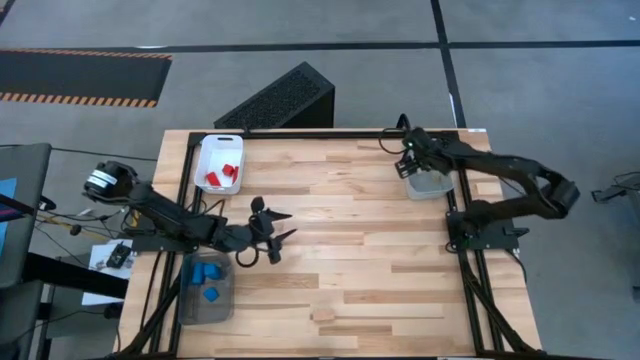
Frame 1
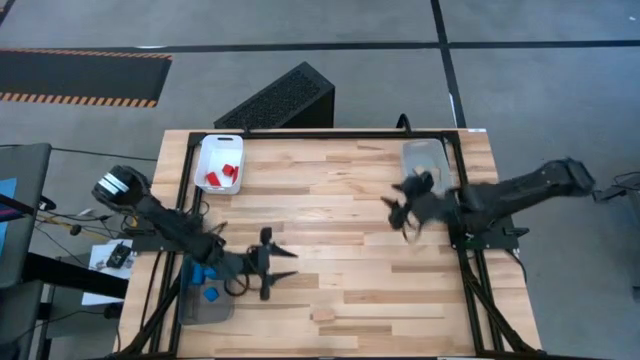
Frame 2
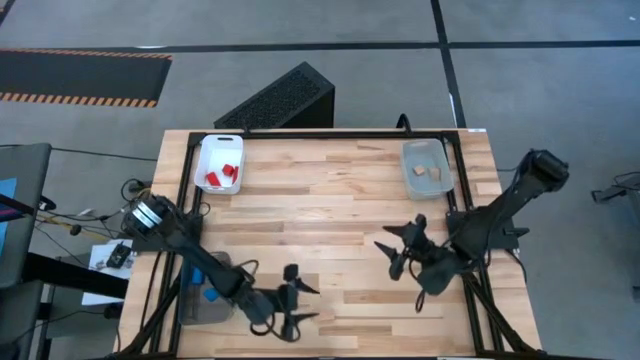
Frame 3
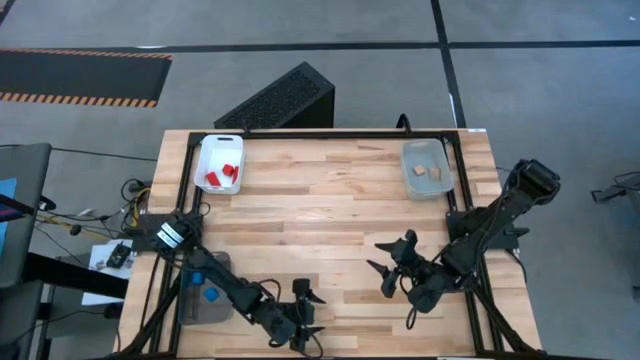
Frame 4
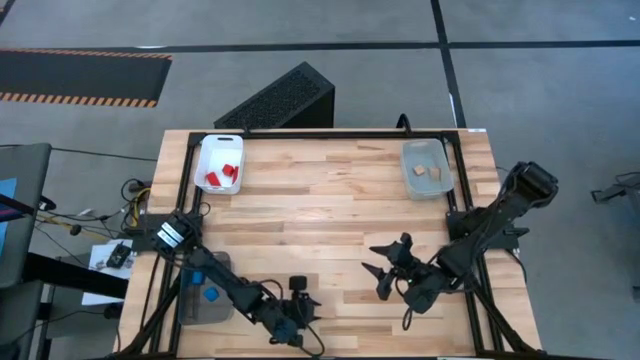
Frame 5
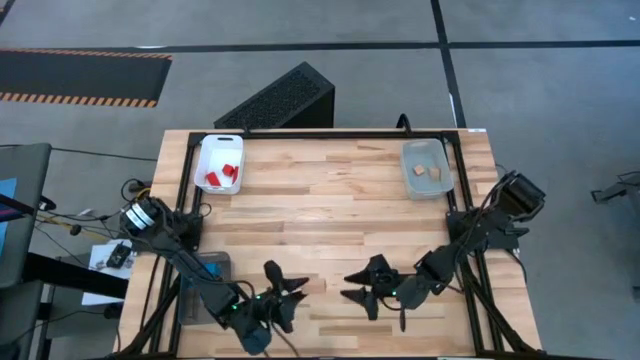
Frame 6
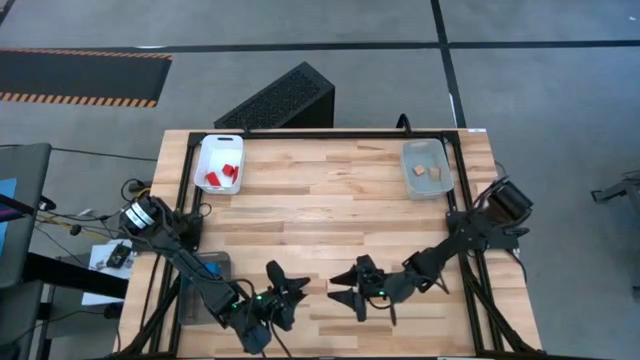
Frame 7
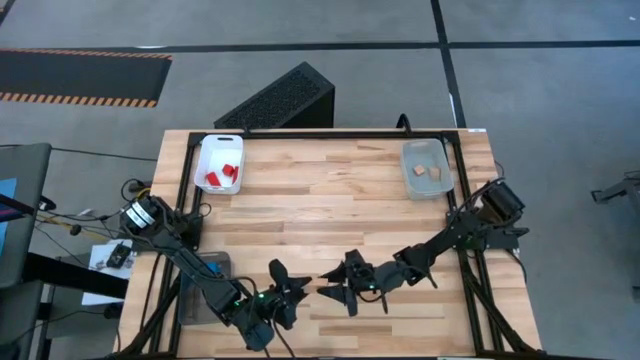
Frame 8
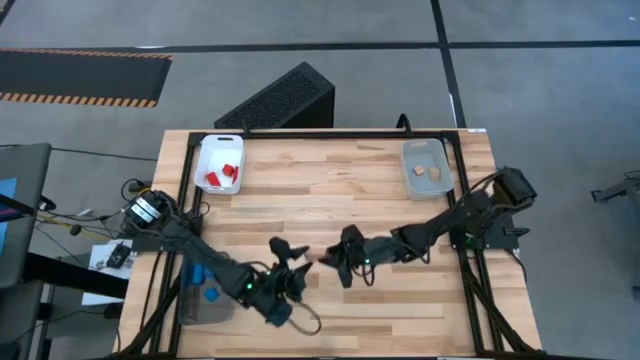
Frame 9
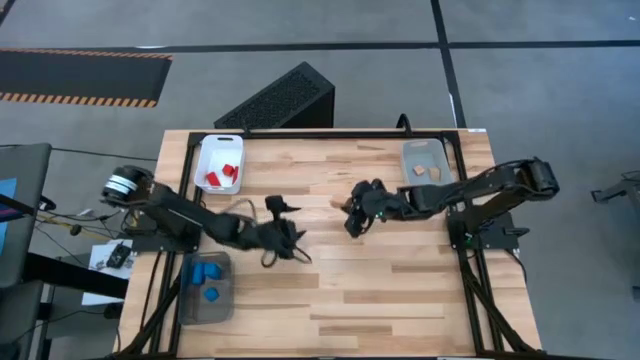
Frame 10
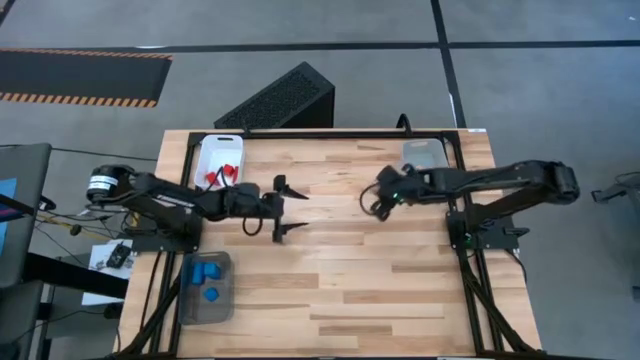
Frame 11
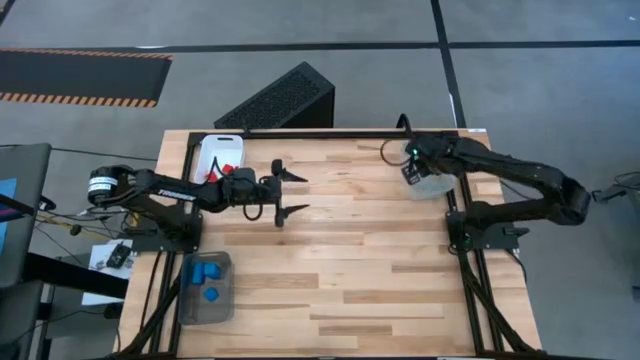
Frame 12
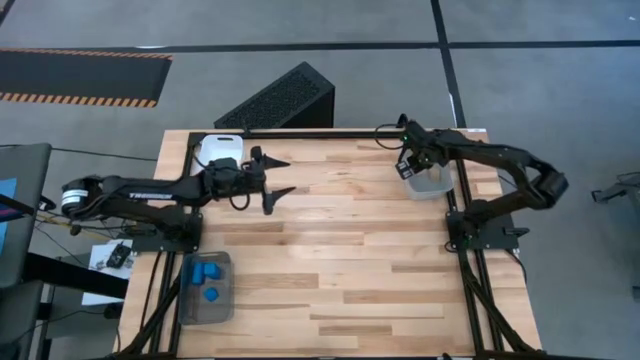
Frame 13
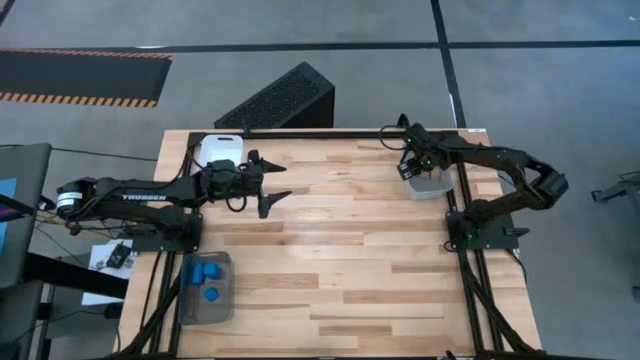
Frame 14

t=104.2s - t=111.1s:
Task: Sort & place blocks by color
Put the brown block into the grey bin

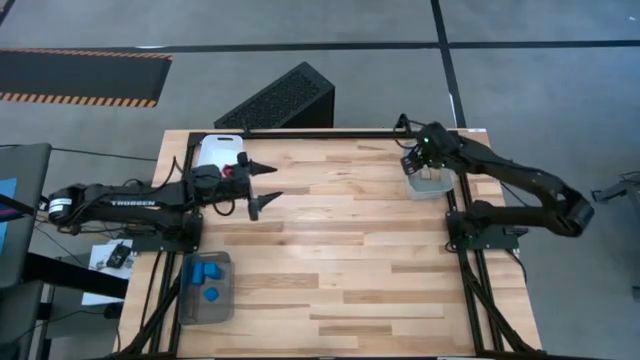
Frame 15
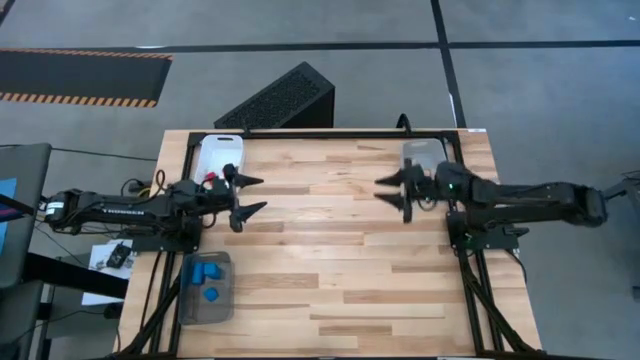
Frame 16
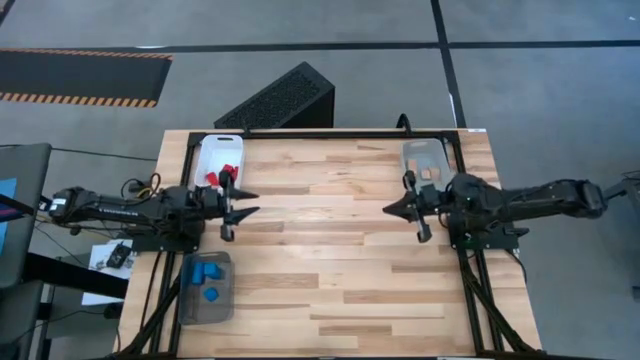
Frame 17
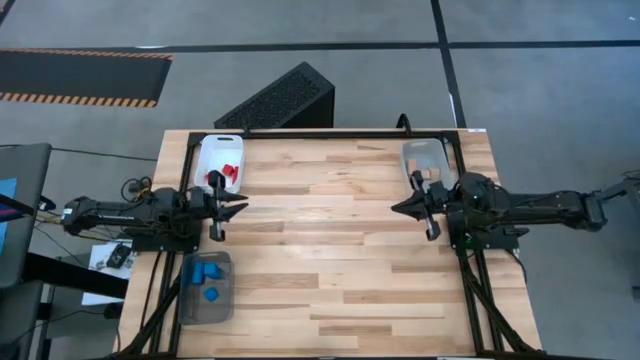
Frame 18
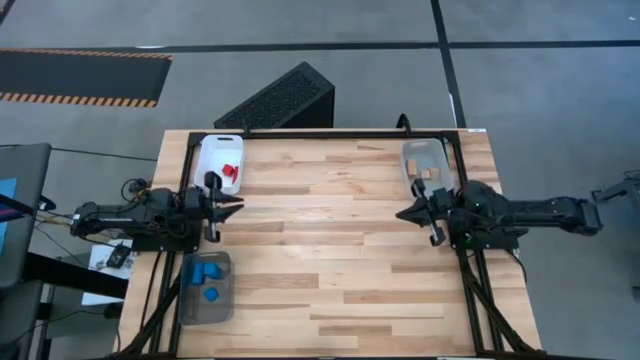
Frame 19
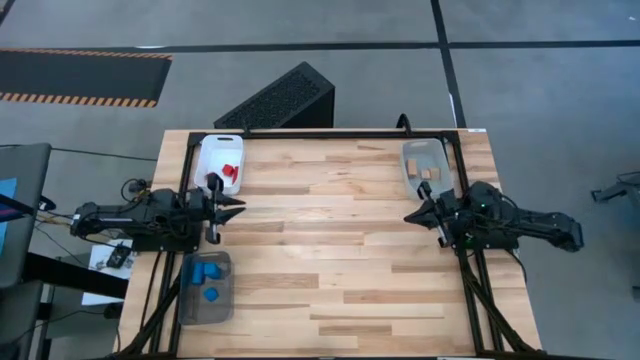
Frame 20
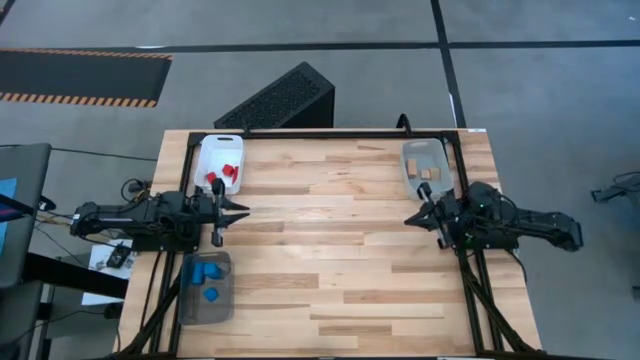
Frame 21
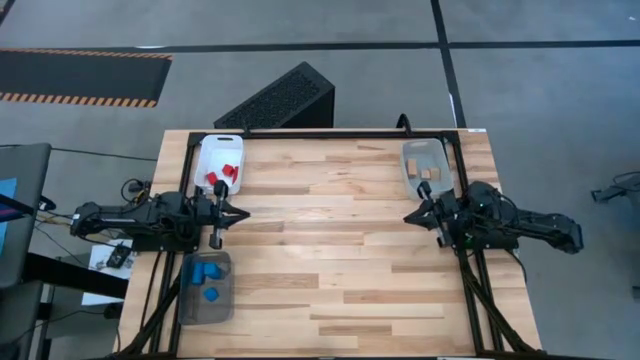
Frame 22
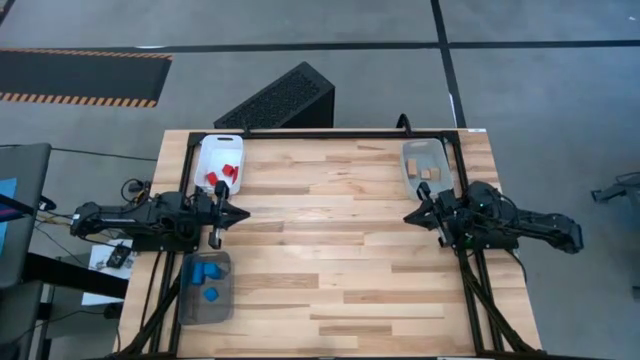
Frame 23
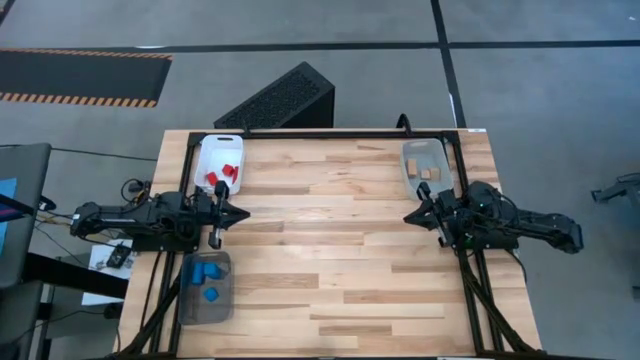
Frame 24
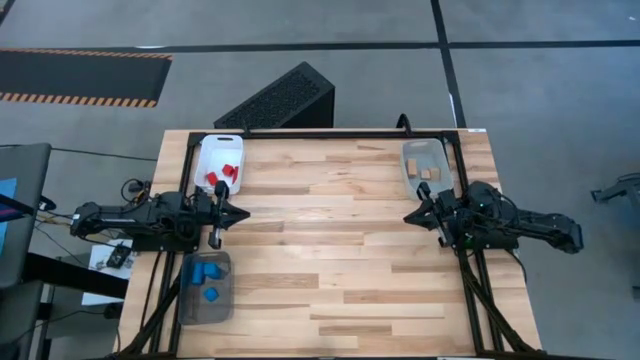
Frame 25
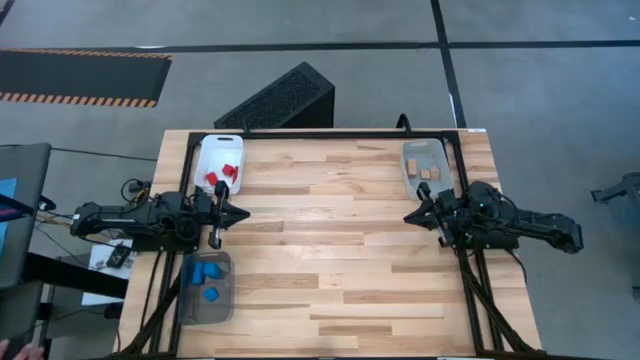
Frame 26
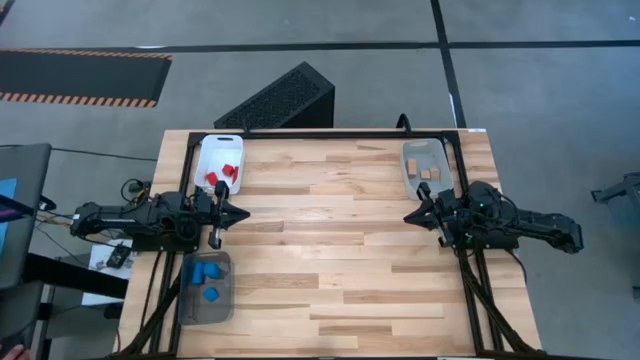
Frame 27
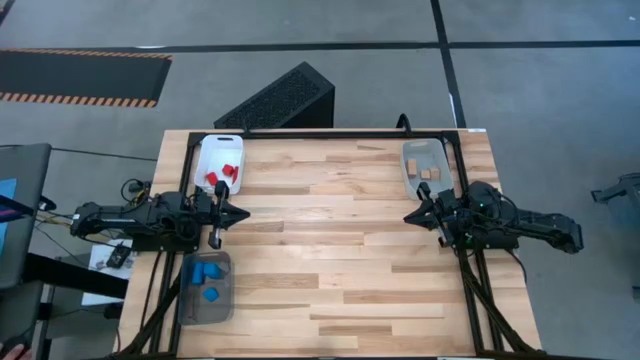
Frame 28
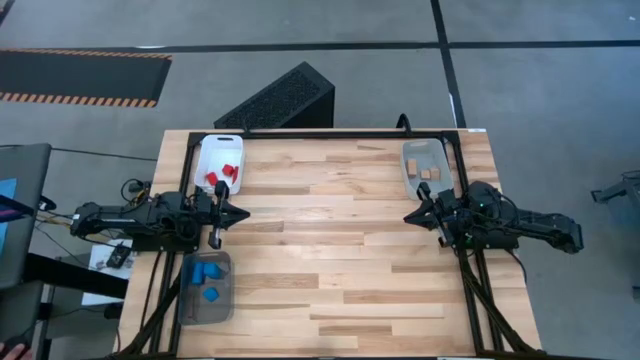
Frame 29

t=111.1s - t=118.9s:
Return to Home Position

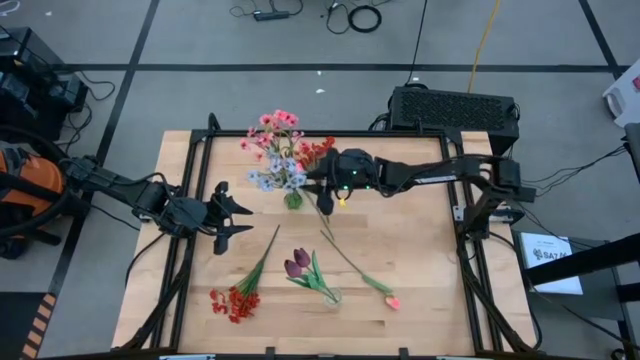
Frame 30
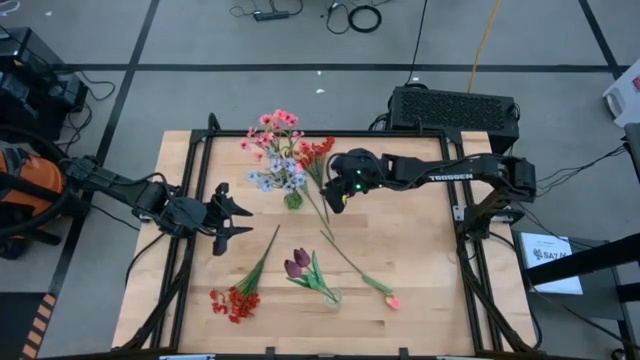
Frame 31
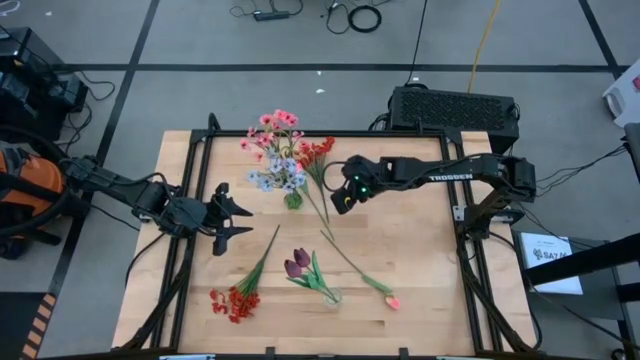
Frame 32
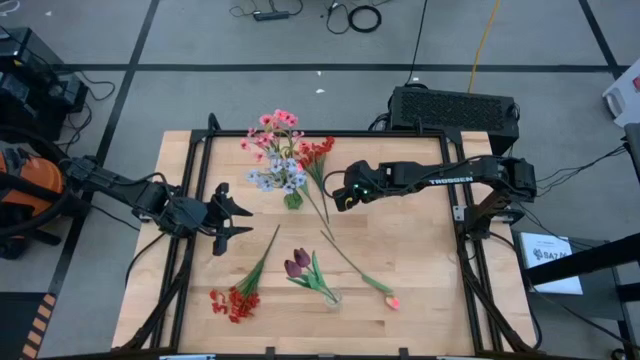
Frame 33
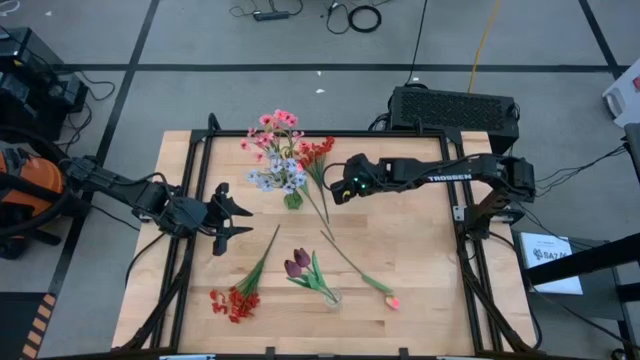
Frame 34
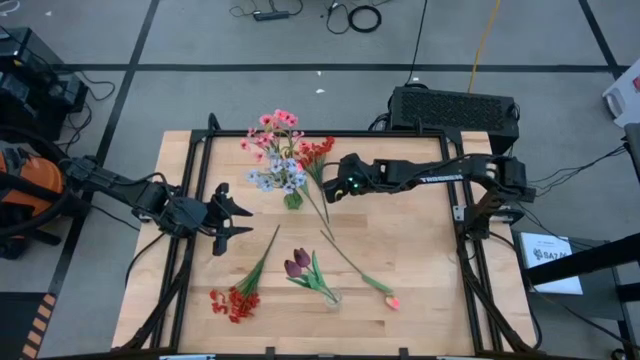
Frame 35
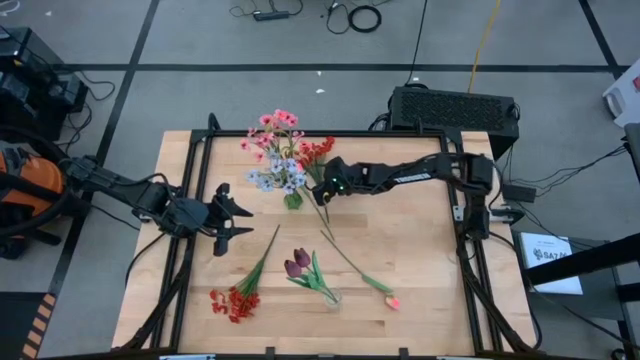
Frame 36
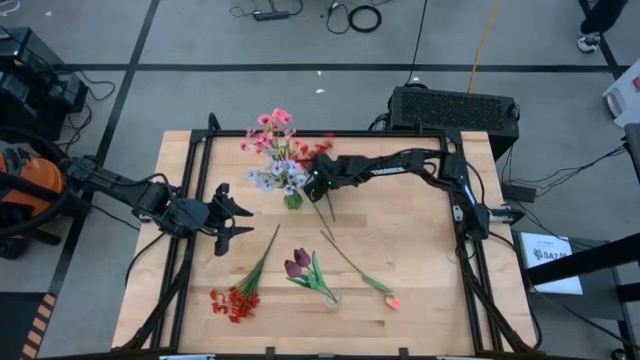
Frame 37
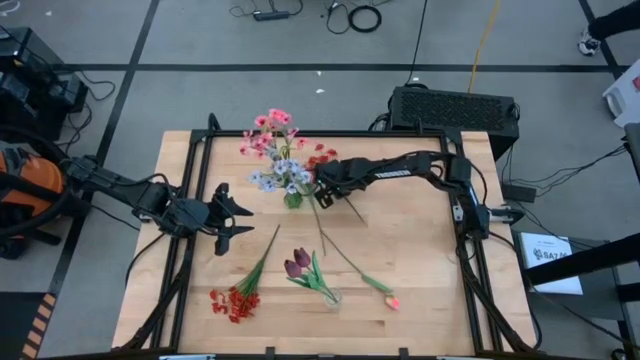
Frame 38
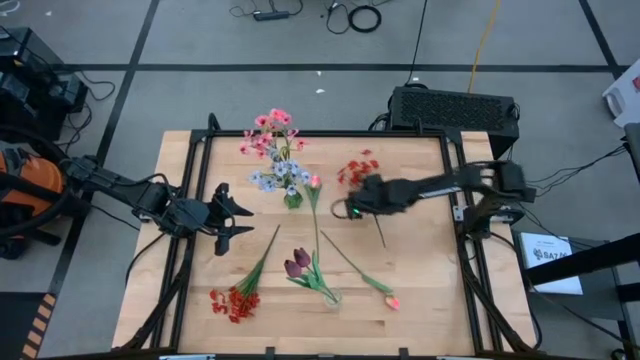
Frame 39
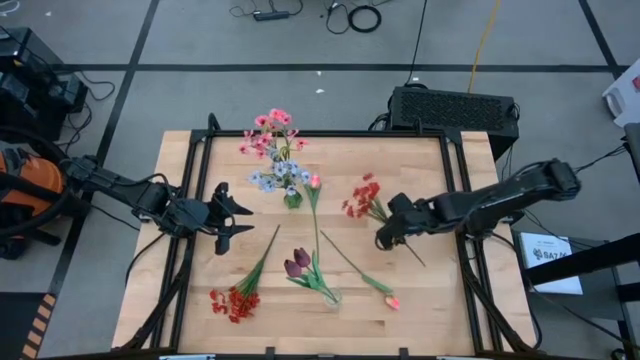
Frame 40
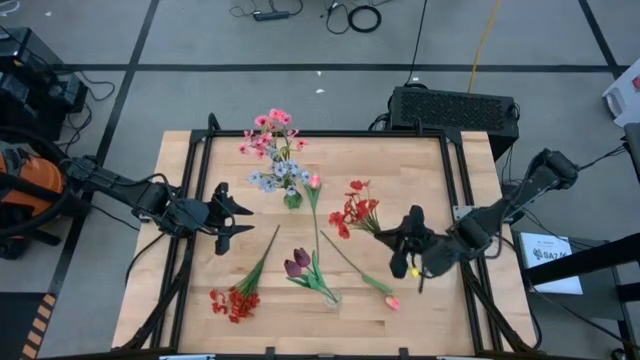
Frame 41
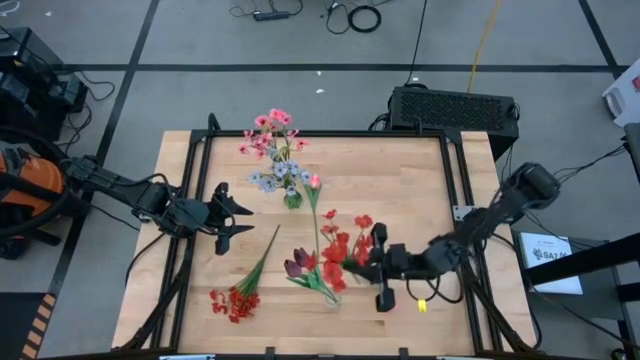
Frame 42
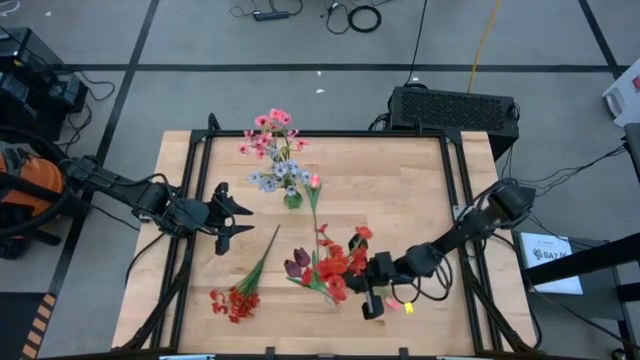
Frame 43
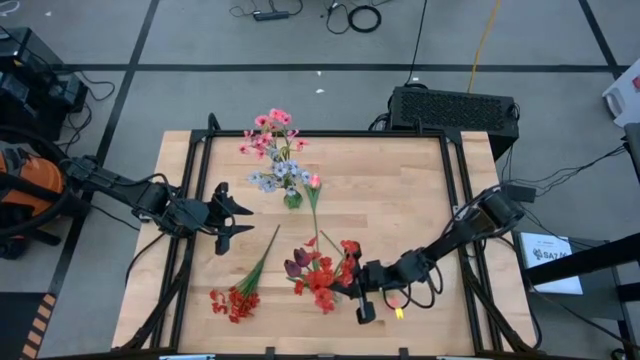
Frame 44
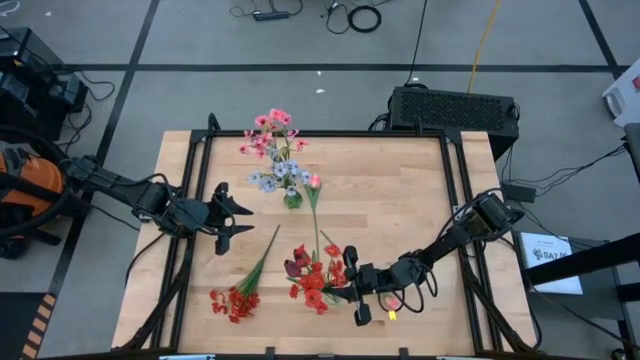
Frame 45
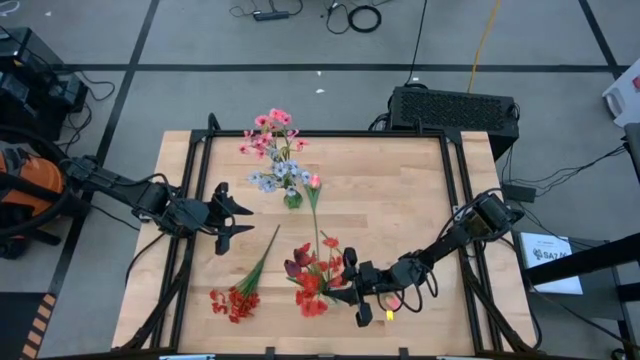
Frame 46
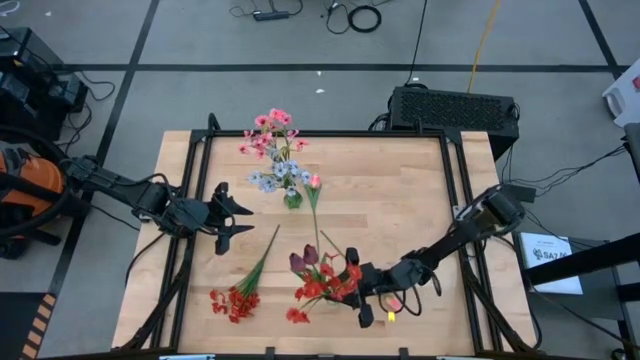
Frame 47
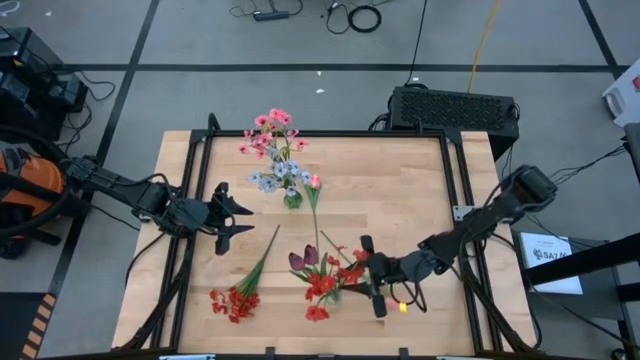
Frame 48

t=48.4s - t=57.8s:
Task: Sort flowers into vase by color
Put the top red flowers into the transparent vase
